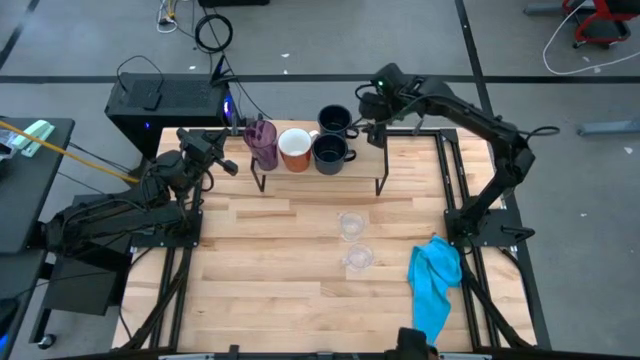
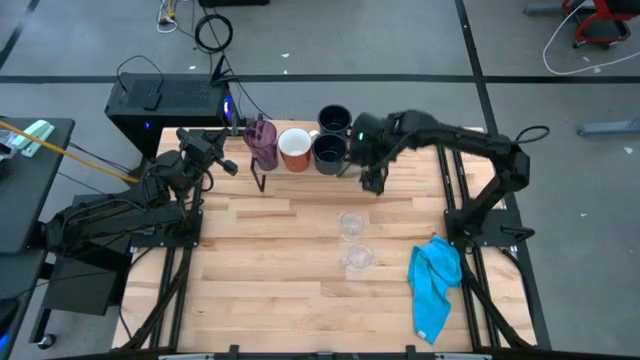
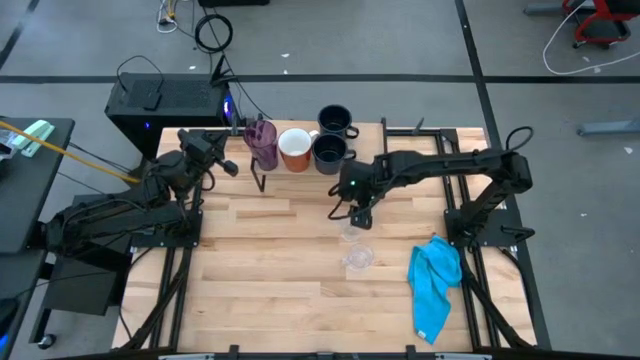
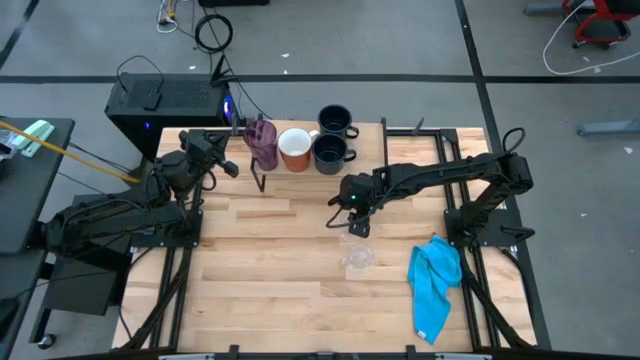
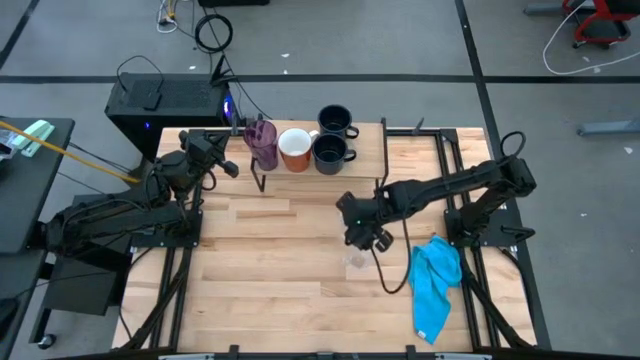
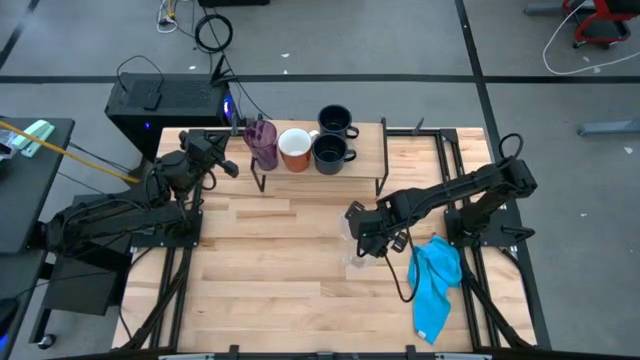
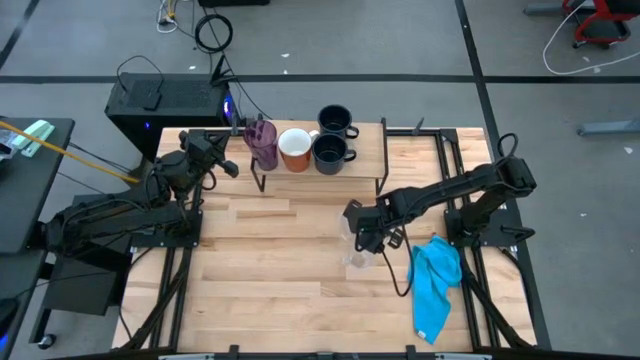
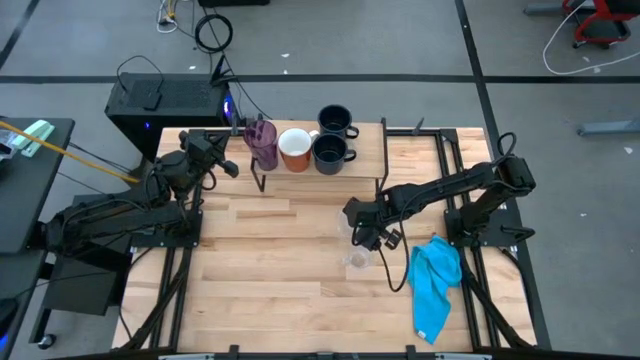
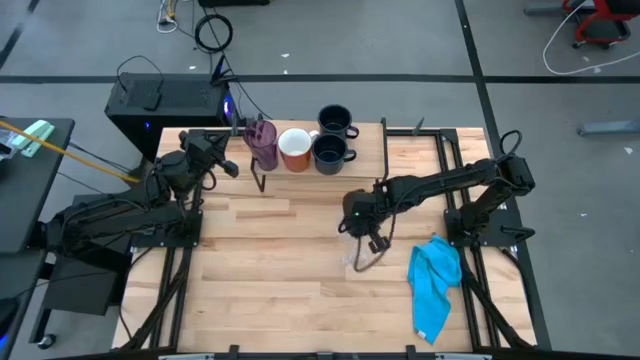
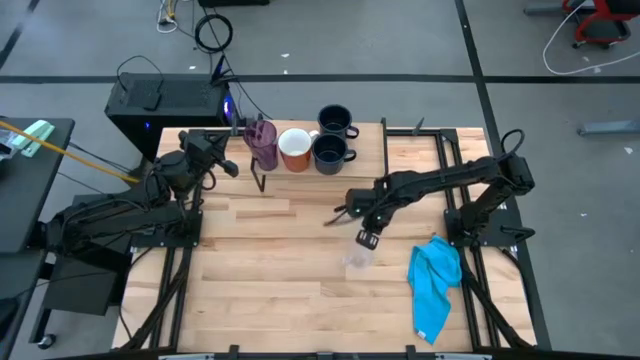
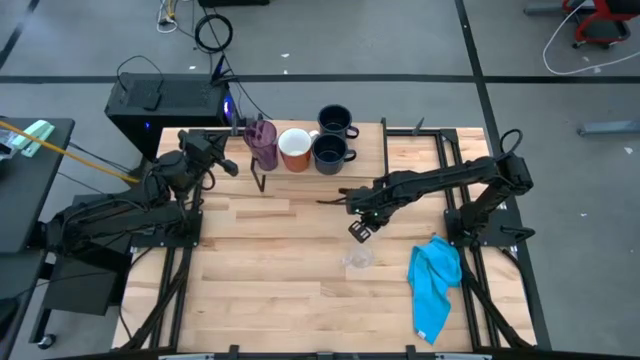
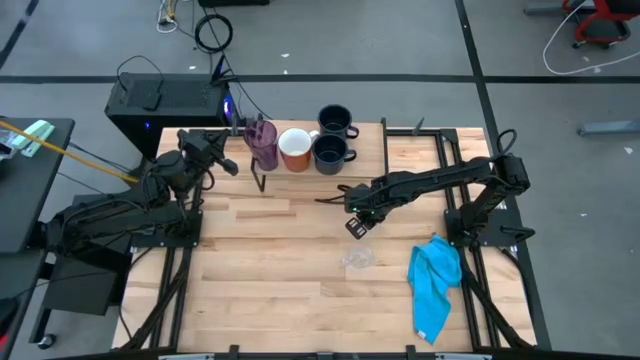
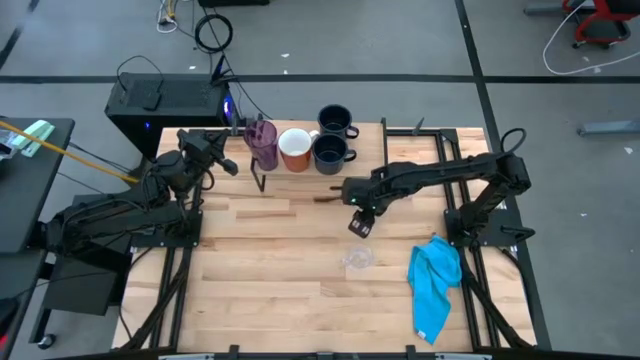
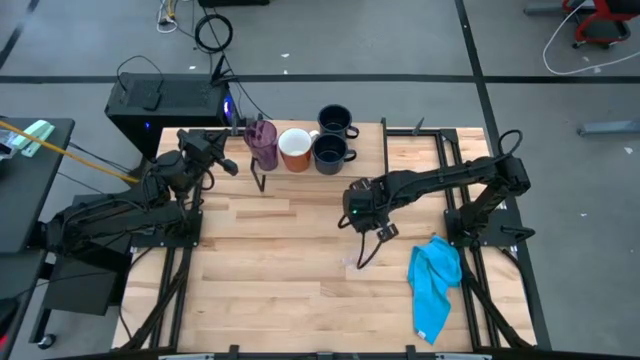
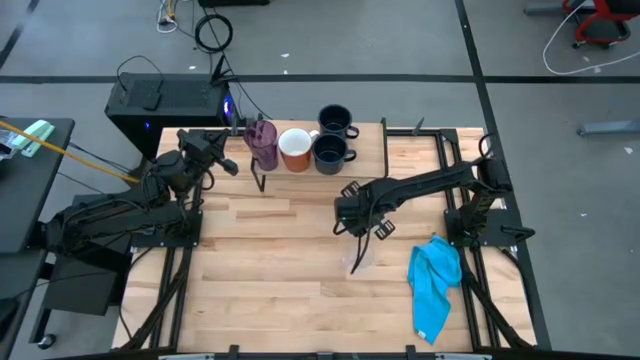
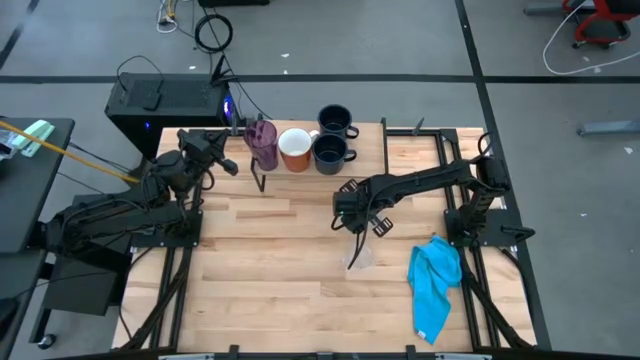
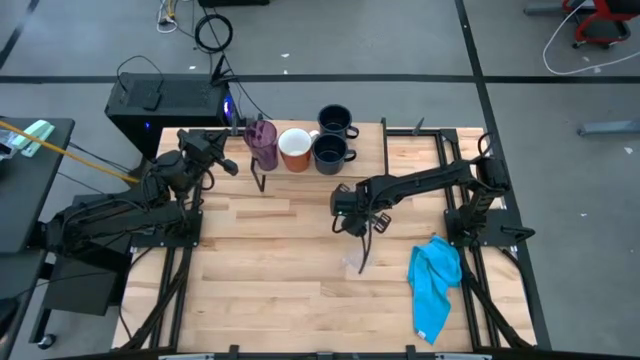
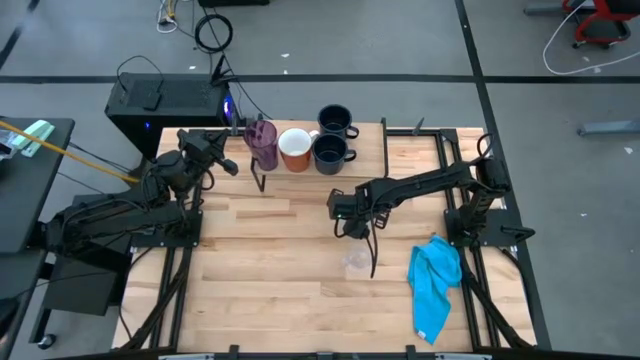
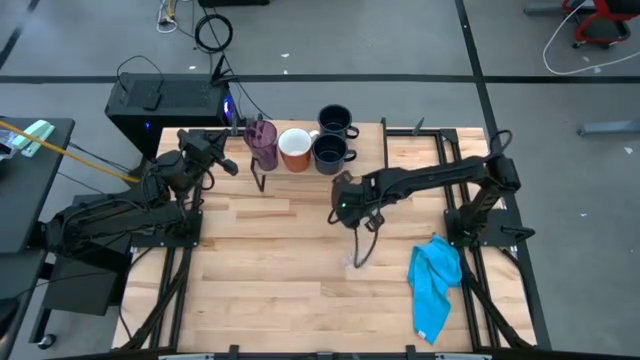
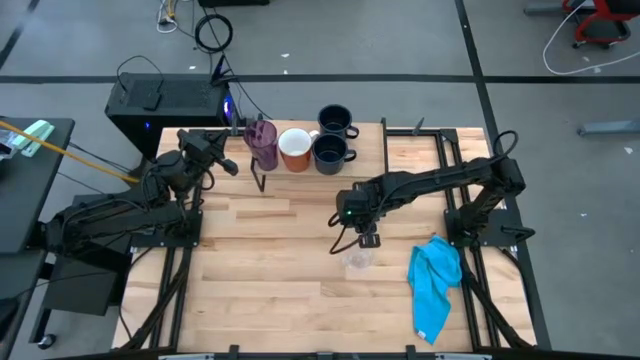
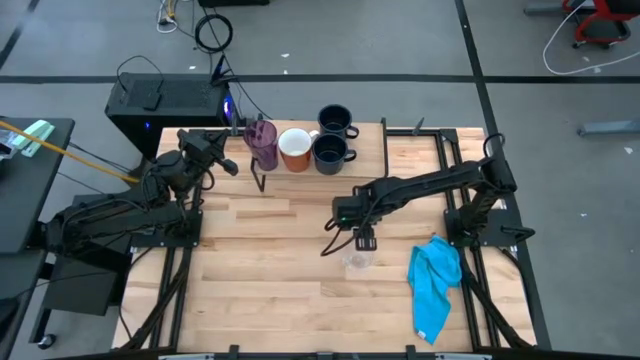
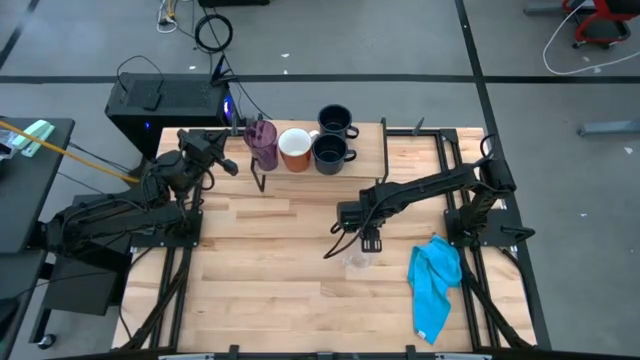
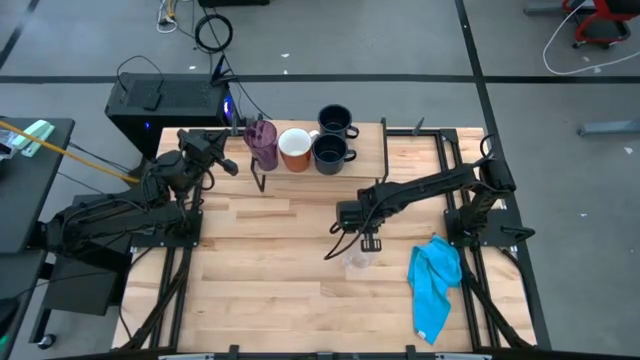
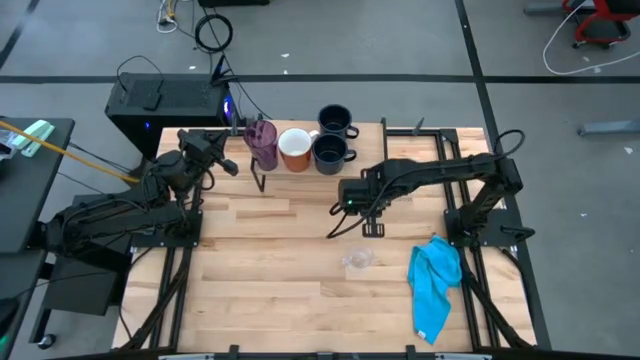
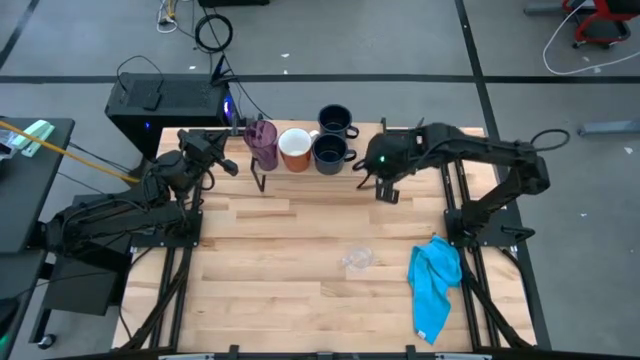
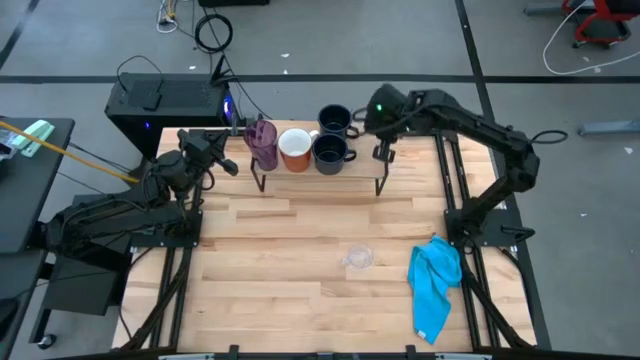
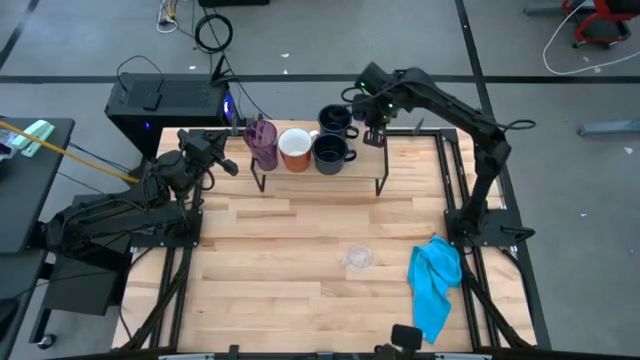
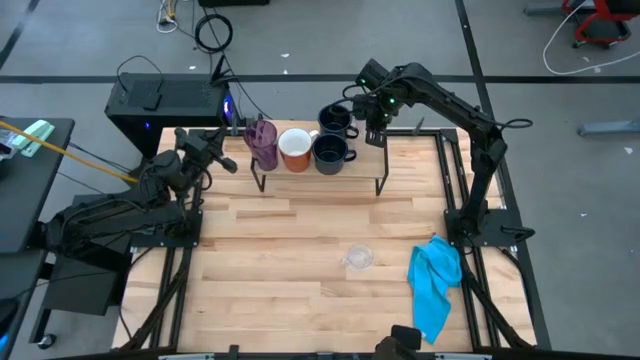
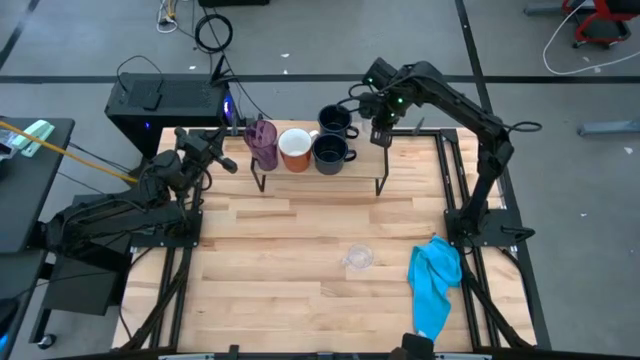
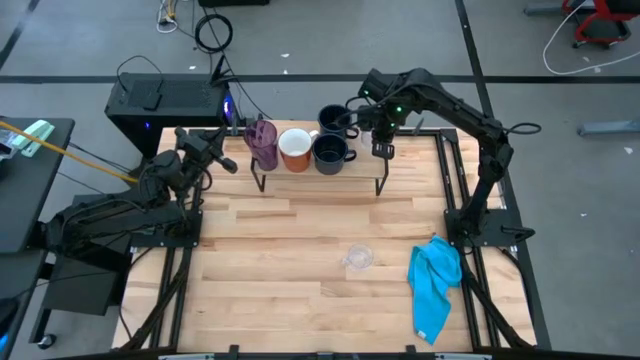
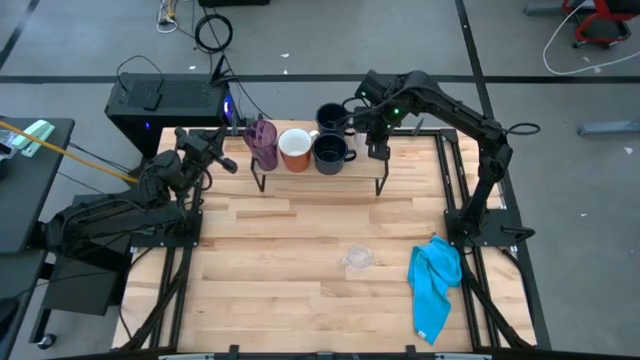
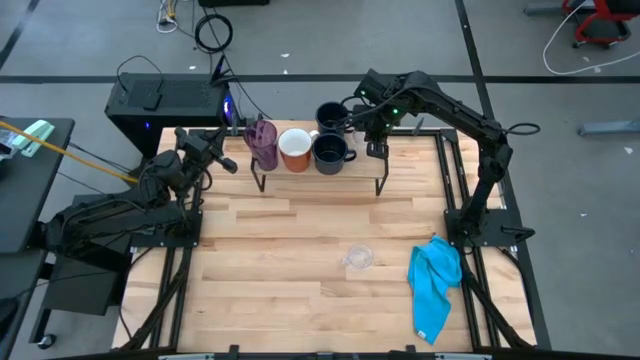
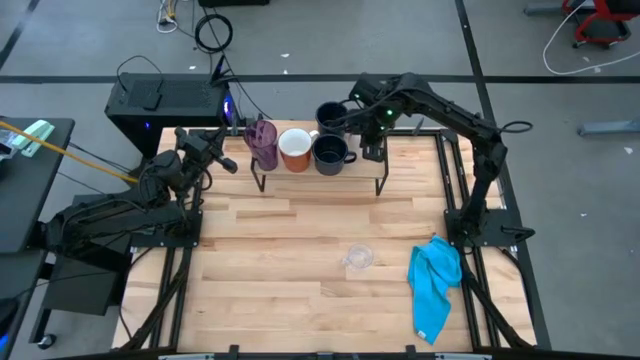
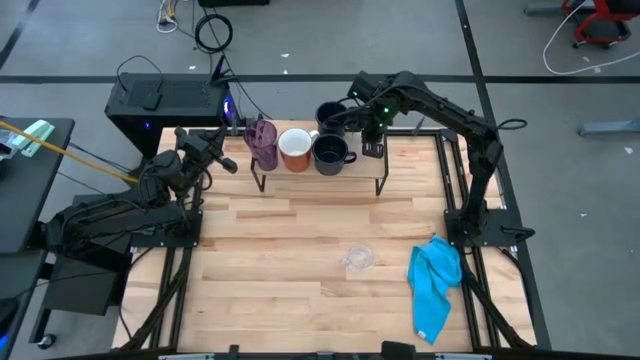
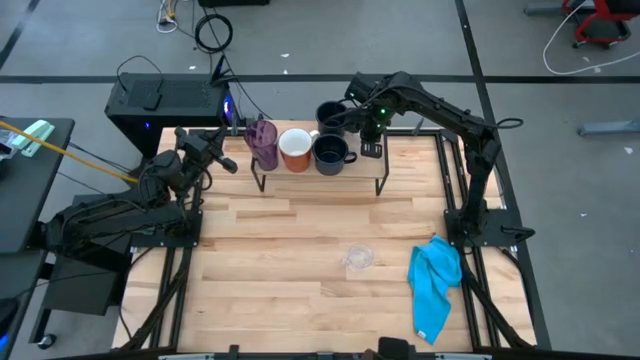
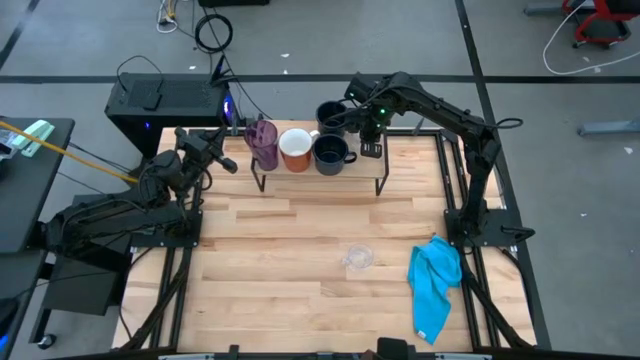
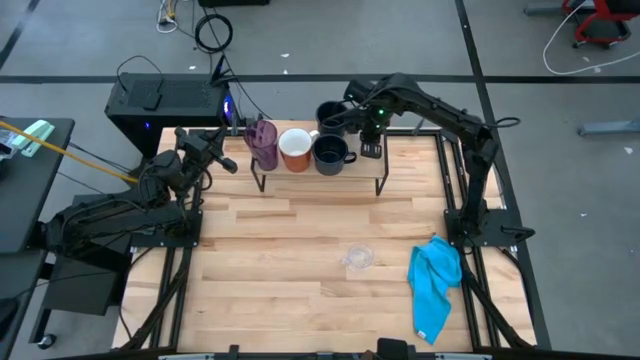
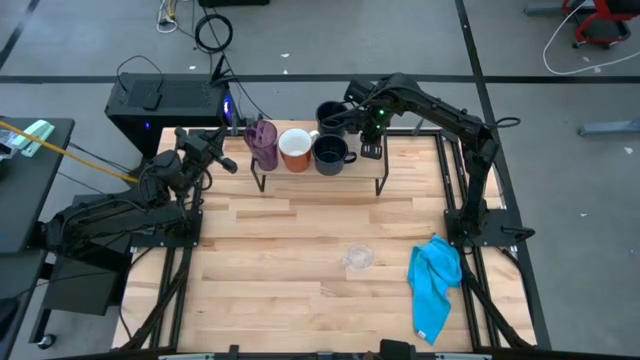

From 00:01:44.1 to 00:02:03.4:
Task: Stack small to large cups/mugs on shelf
Put the transparent mug on the shelf
